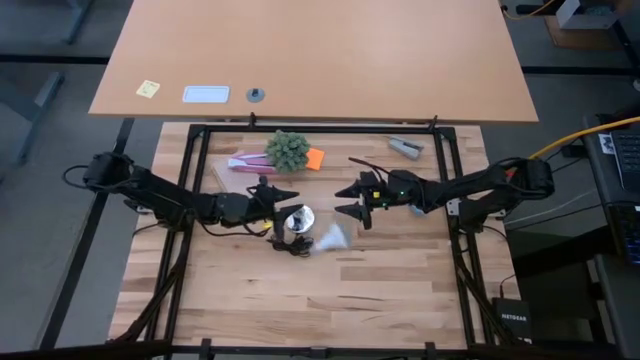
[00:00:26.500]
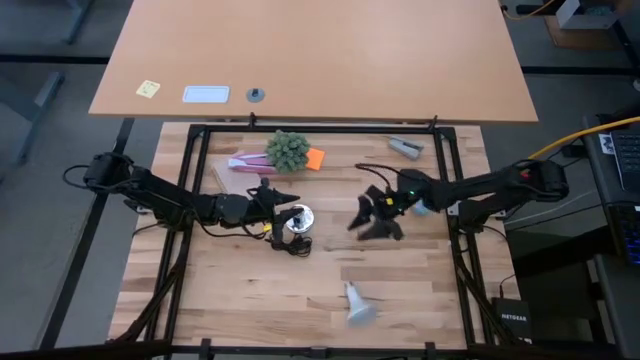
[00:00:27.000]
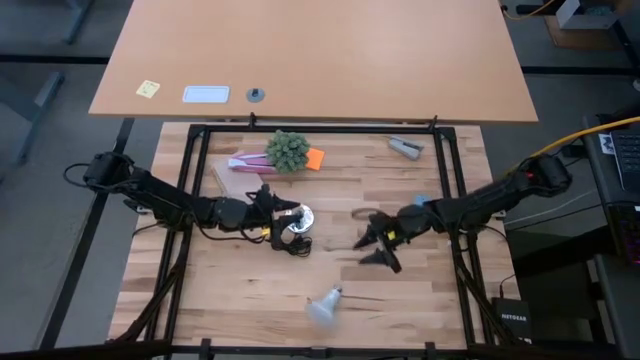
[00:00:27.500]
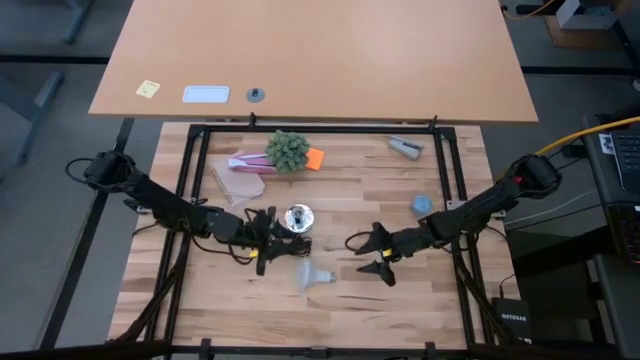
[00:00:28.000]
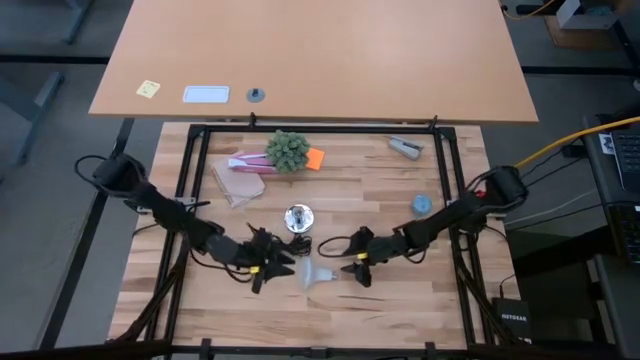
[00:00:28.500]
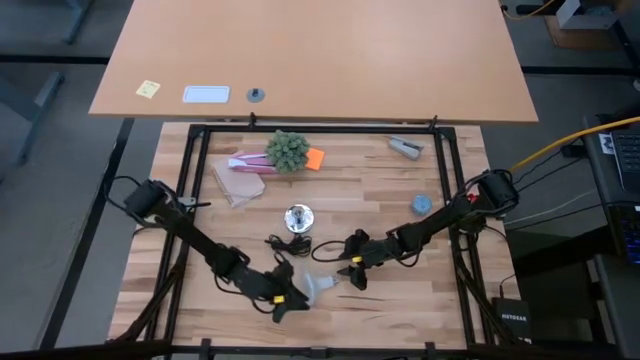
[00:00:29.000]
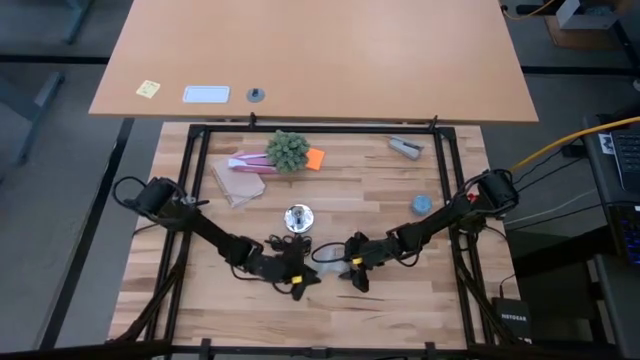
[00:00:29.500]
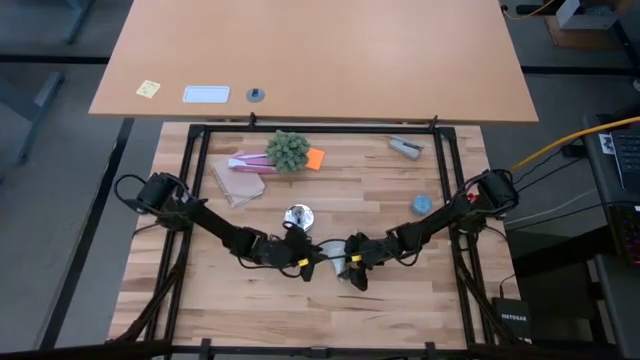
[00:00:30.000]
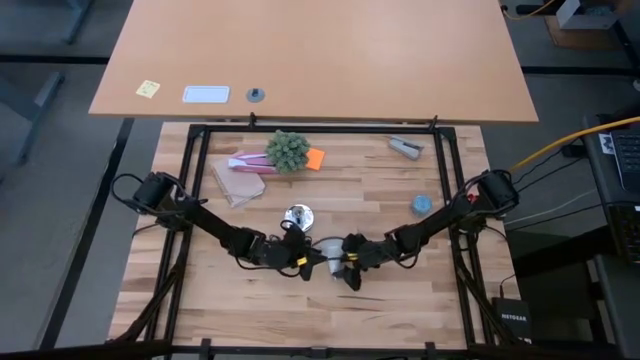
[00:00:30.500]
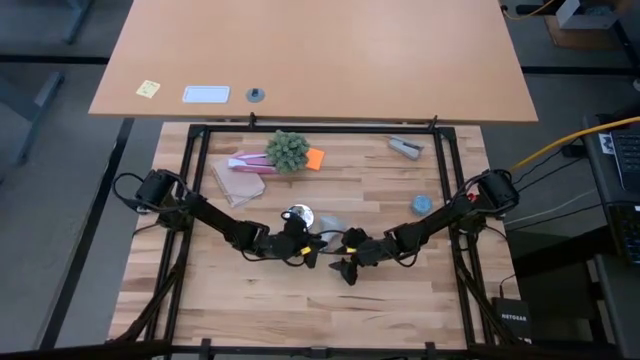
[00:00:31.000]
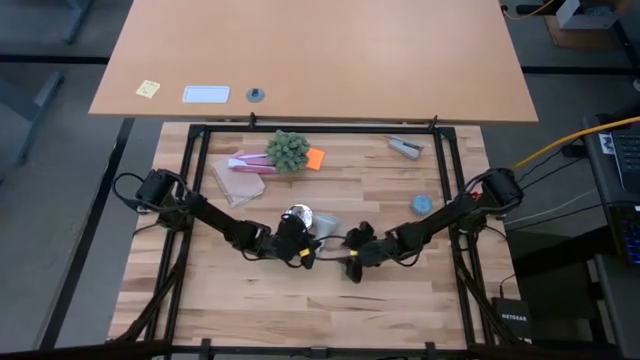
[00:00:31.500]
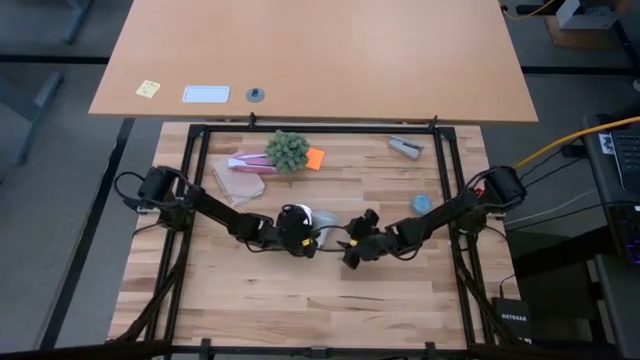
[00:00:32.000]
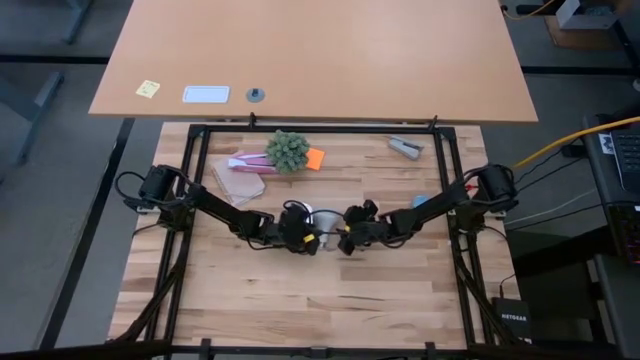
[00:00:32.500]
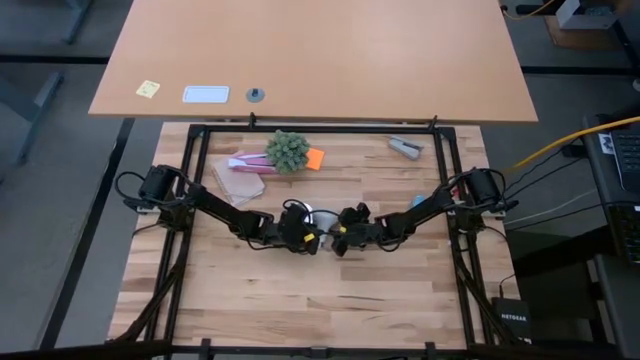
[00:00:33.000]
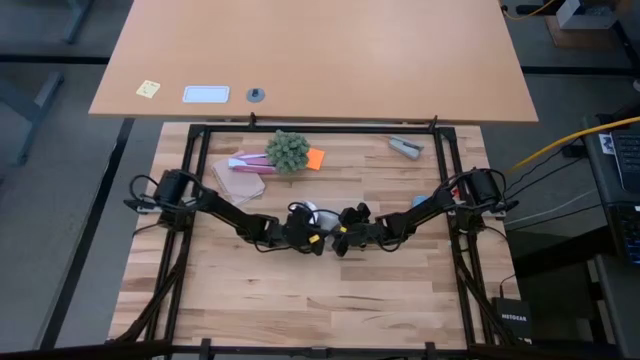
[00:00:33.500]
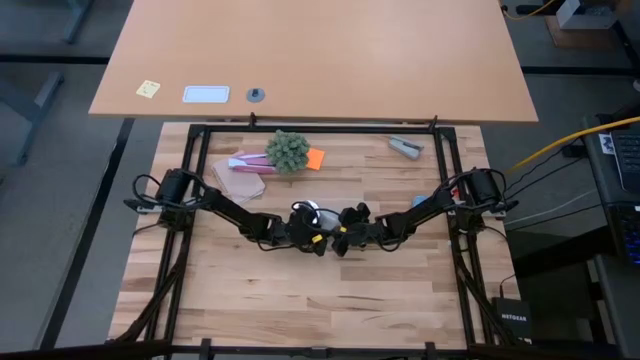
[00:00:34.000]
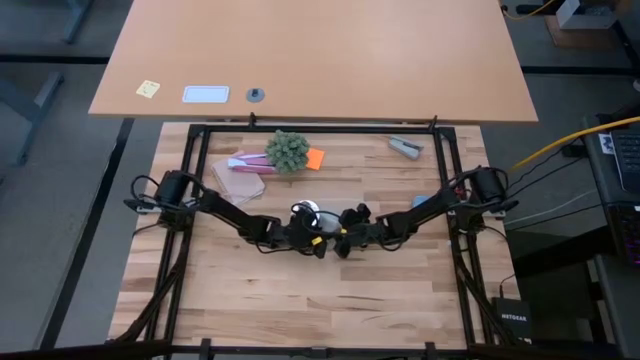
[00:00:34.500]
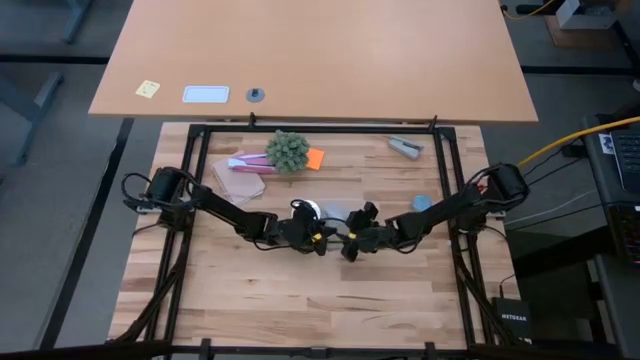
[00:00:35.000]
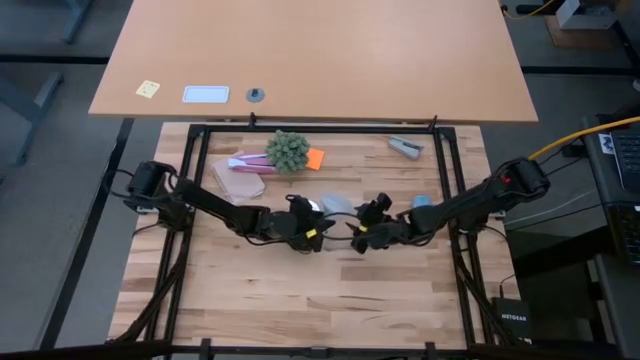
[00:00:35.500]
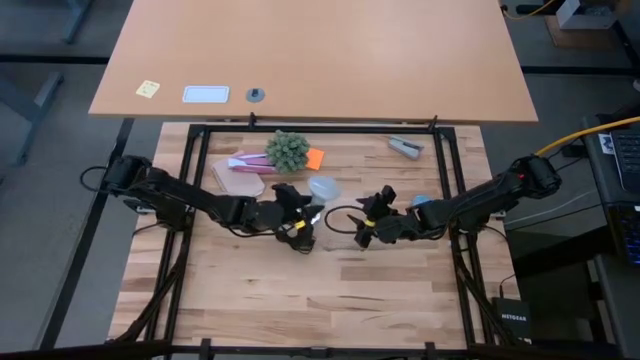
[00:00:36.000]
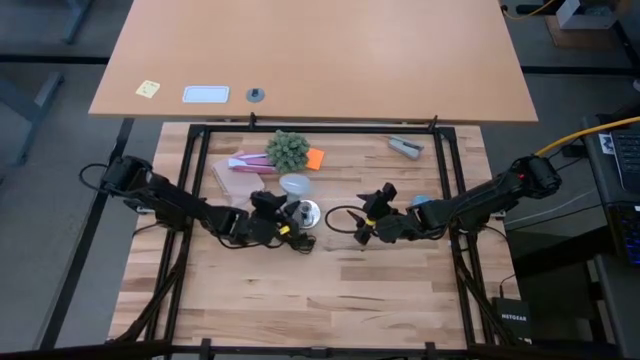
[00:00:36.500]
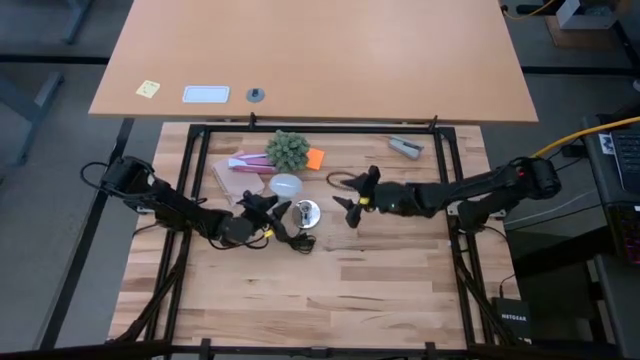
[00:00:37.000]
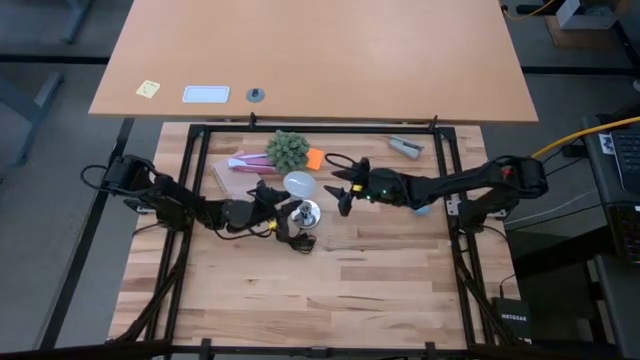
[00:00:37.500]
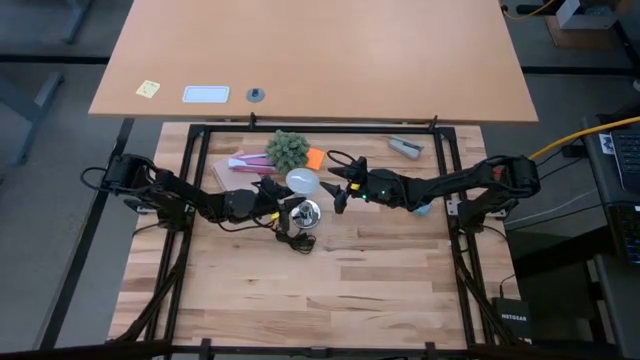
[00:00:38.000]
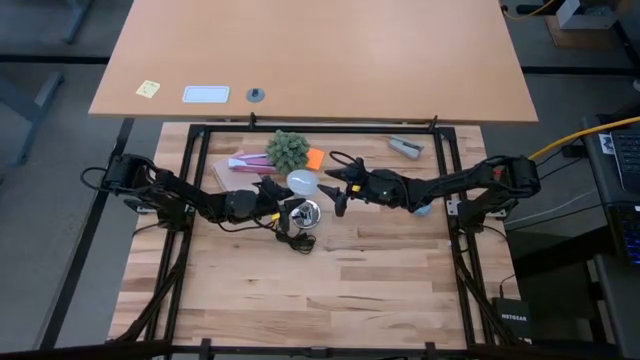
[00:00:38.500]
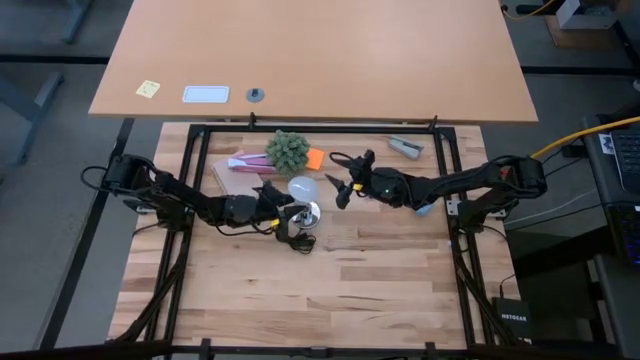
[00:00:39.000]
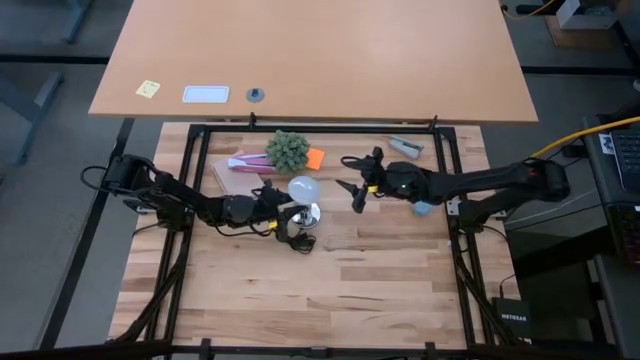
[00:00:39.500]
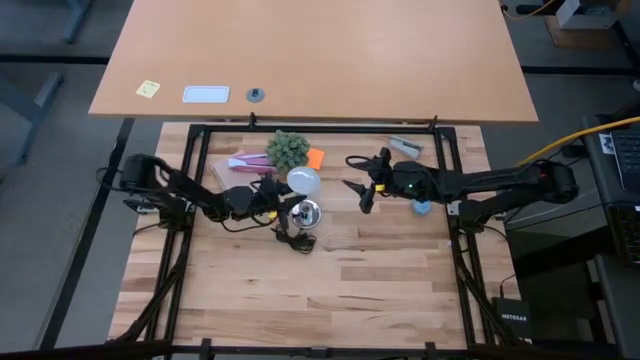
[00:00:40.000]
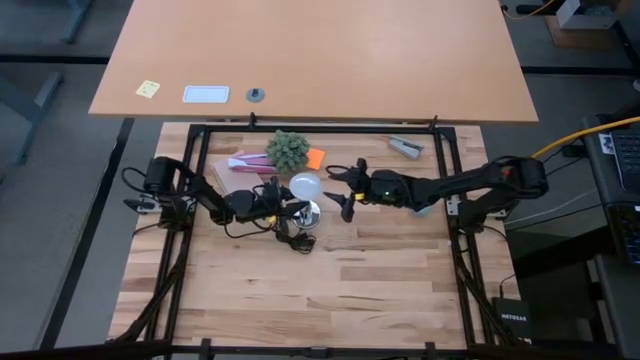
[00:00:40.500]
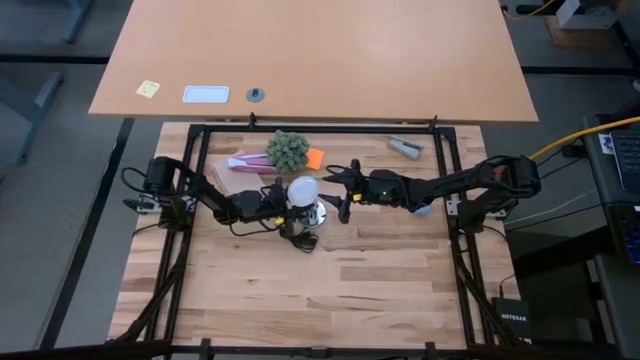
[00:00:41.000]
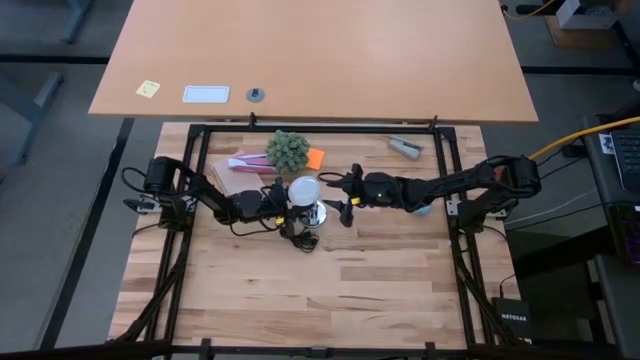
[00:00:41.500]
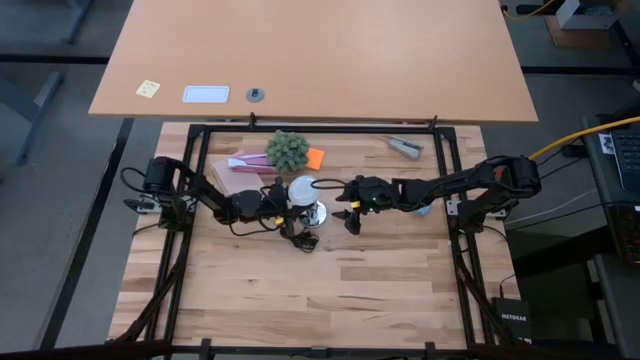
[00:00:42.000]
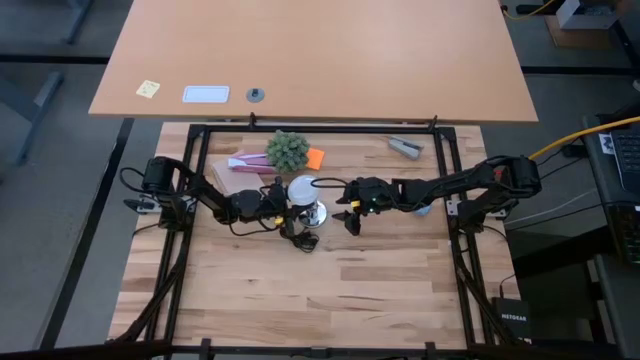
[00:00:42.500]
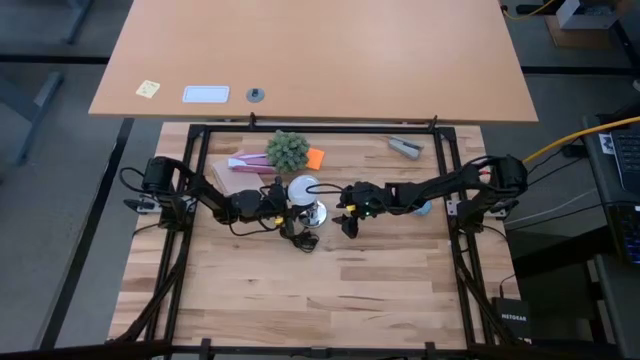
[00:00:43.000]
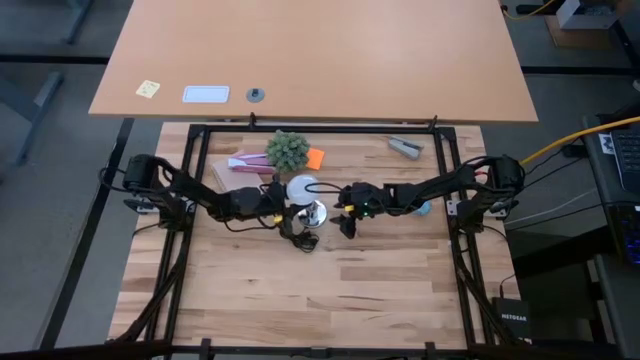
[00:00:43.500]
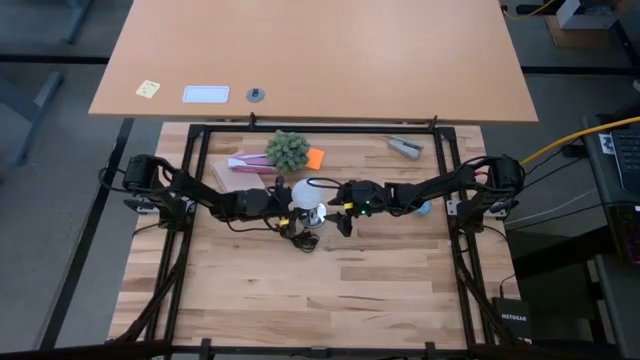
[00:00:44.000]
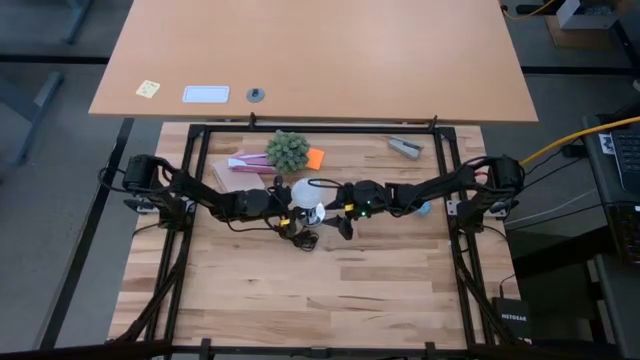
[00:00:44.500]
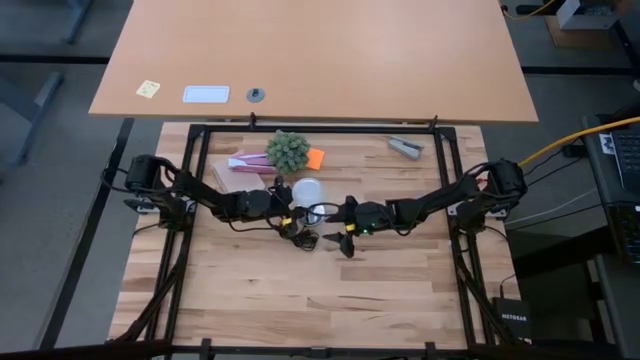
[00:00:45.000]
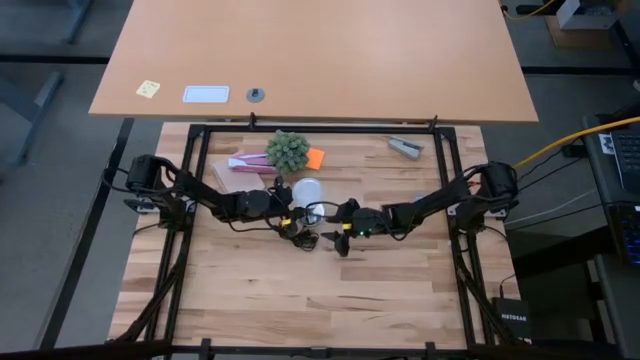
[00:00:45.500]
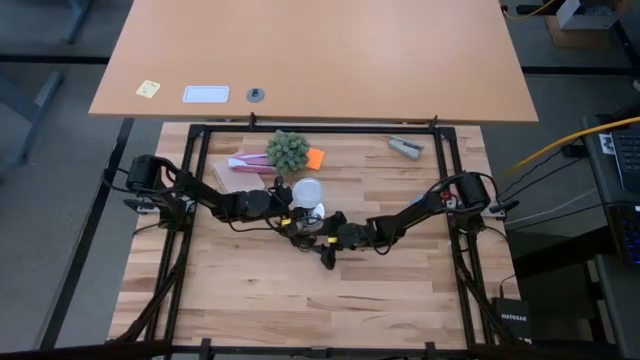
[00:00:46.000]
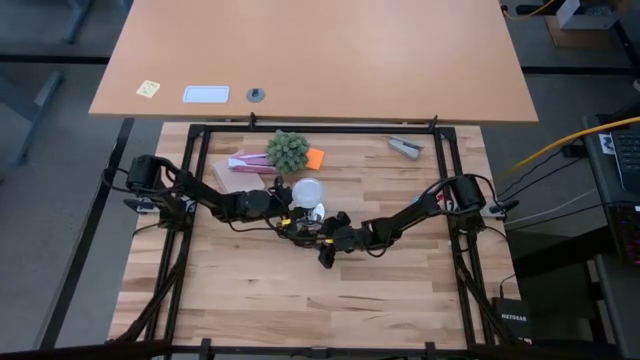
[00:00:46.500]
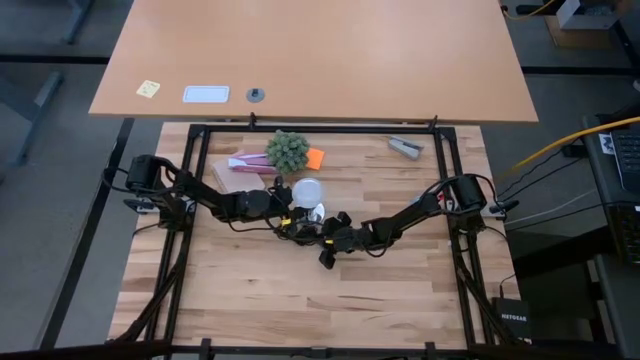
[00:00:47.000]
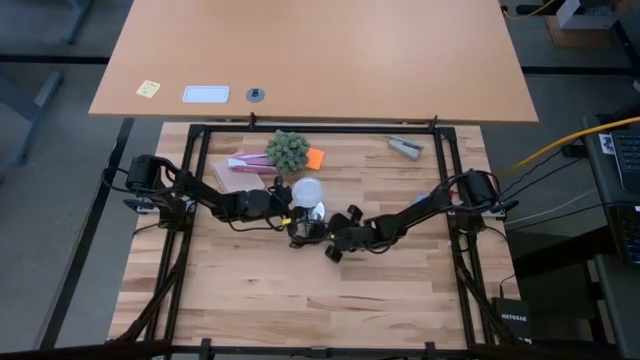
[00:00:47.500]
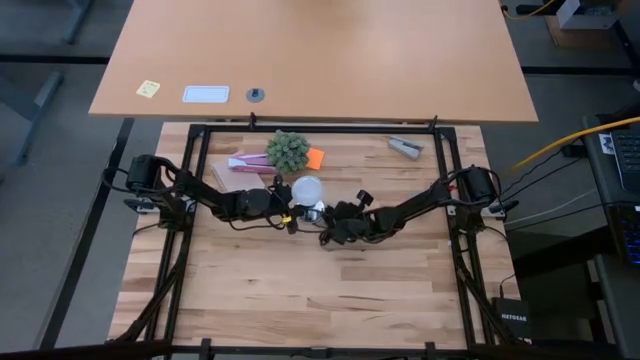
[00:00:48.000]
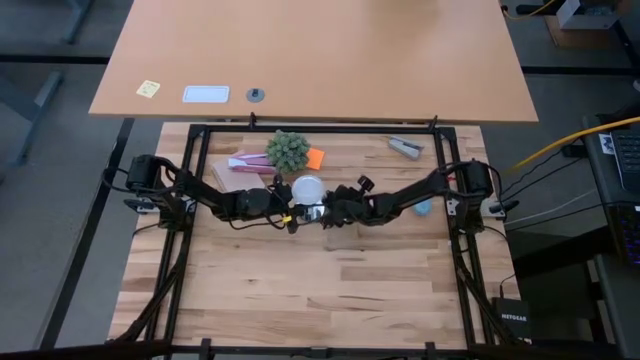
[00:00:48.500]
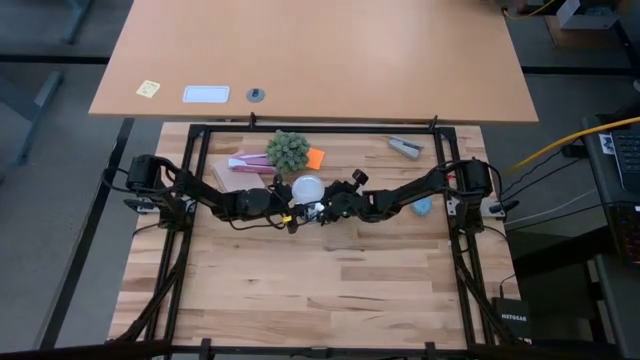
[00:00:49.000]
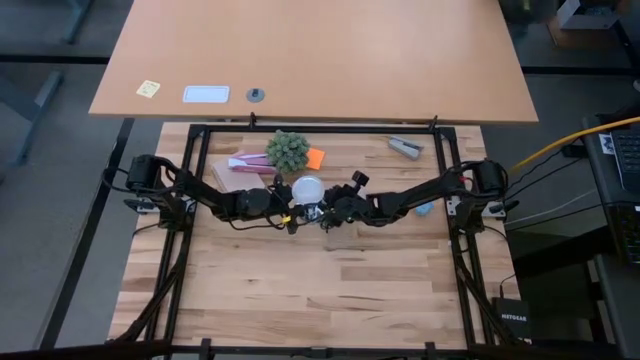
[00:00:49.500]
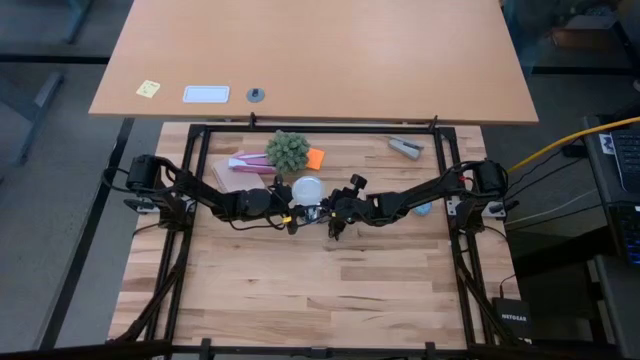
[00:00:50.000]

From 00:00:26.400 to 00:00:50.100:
Task: Screw lightbulb
Insert the lightbulb into the lamp
